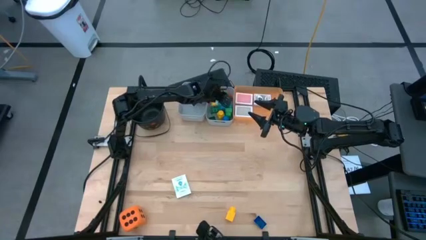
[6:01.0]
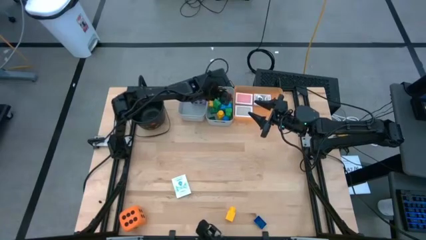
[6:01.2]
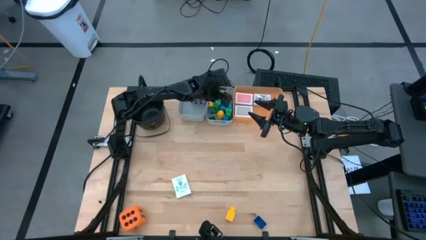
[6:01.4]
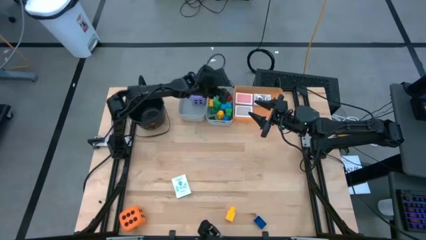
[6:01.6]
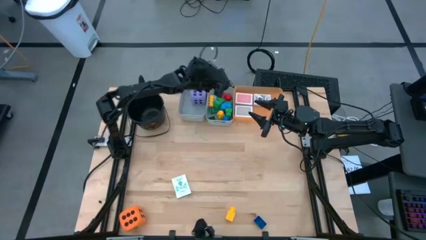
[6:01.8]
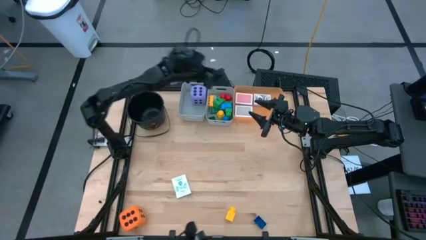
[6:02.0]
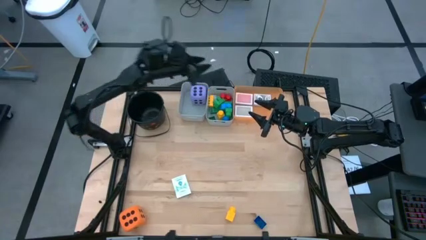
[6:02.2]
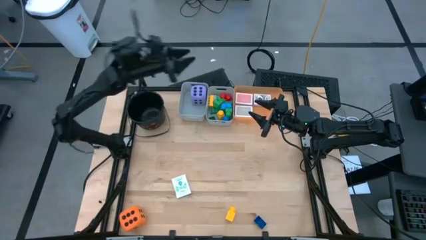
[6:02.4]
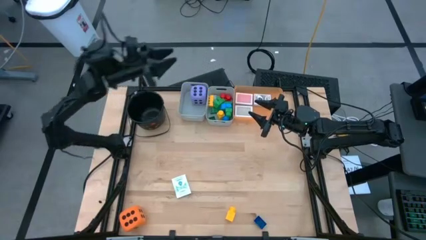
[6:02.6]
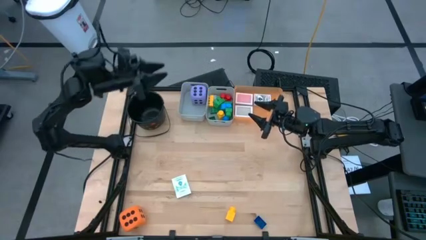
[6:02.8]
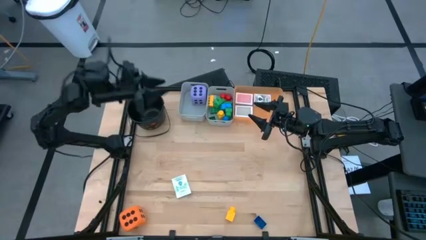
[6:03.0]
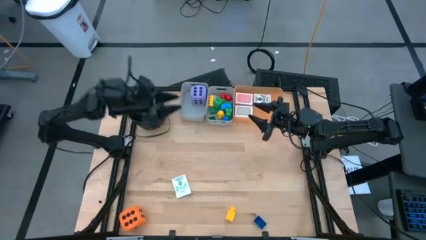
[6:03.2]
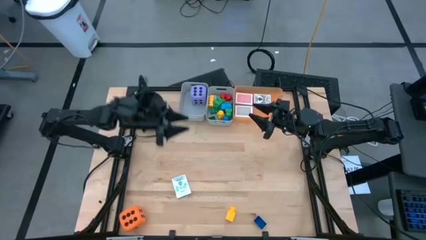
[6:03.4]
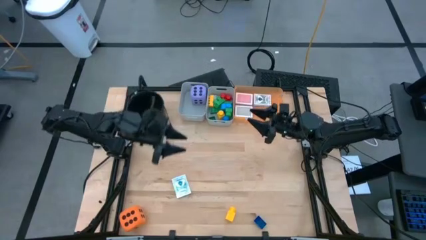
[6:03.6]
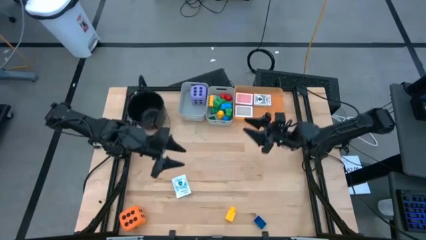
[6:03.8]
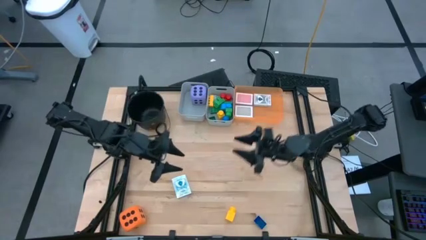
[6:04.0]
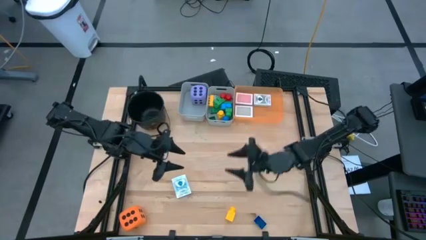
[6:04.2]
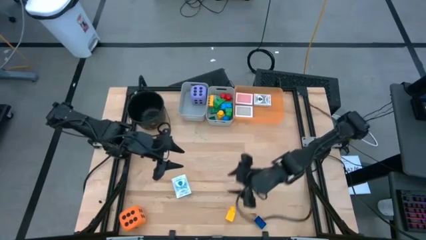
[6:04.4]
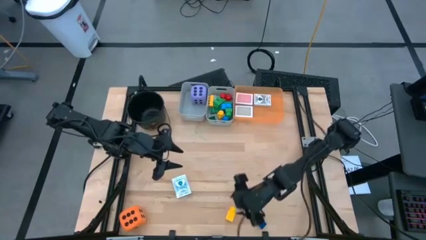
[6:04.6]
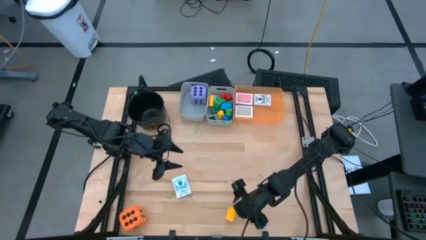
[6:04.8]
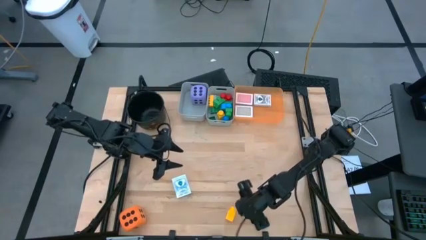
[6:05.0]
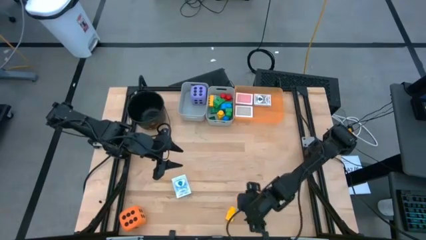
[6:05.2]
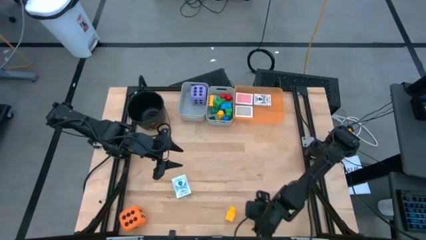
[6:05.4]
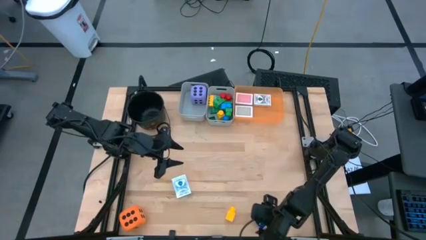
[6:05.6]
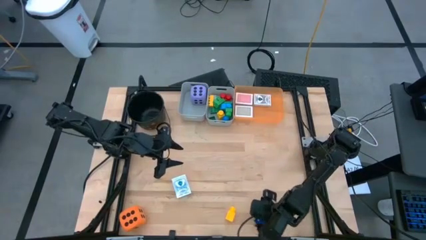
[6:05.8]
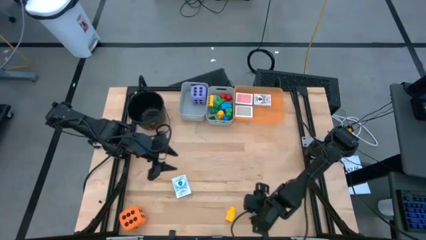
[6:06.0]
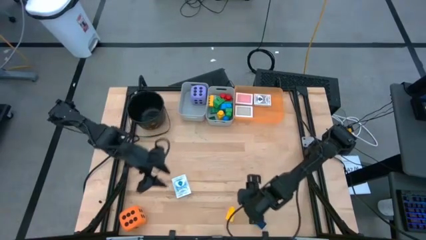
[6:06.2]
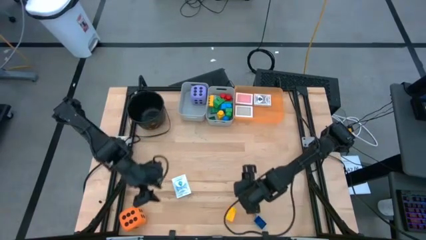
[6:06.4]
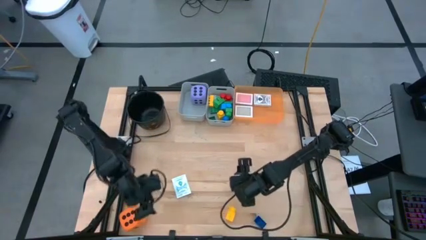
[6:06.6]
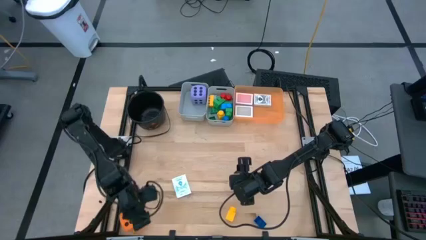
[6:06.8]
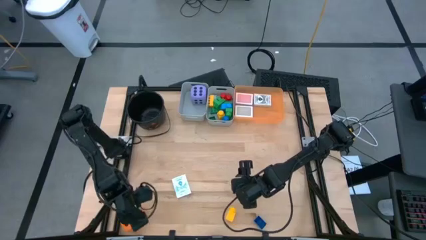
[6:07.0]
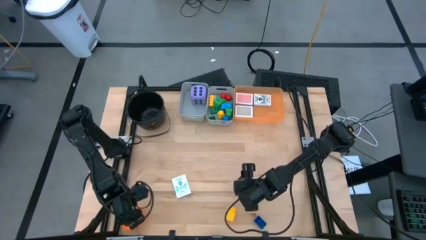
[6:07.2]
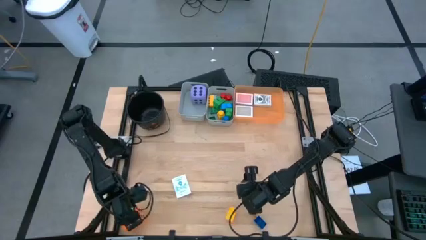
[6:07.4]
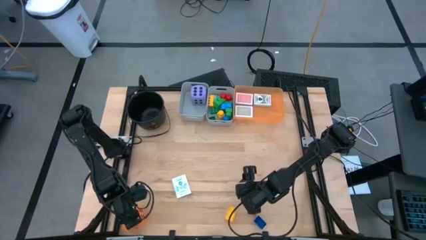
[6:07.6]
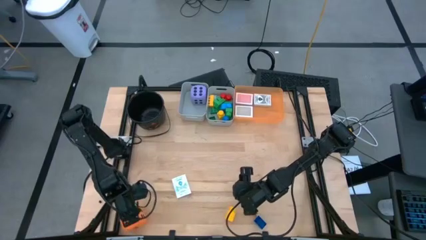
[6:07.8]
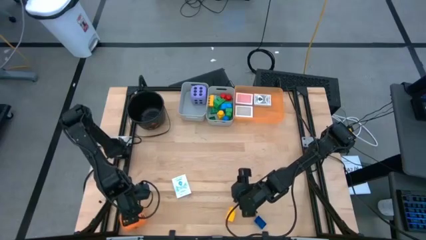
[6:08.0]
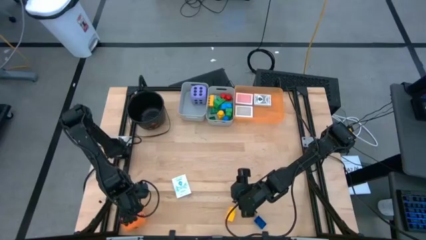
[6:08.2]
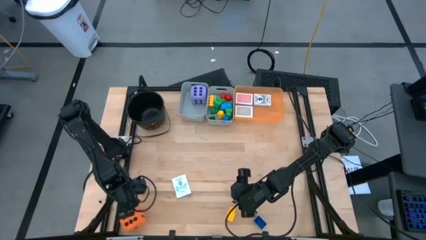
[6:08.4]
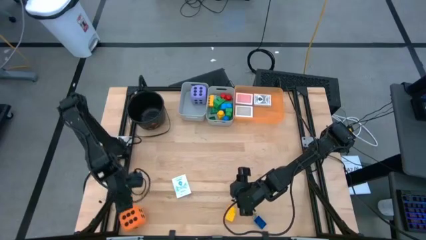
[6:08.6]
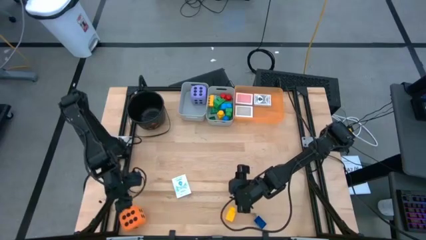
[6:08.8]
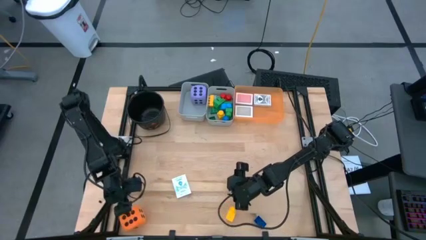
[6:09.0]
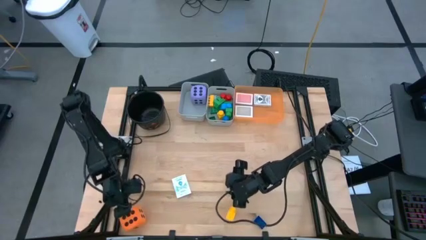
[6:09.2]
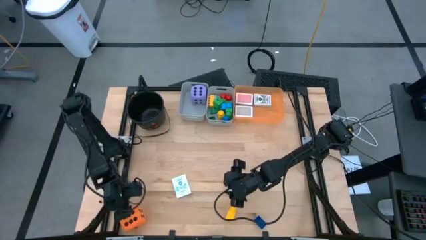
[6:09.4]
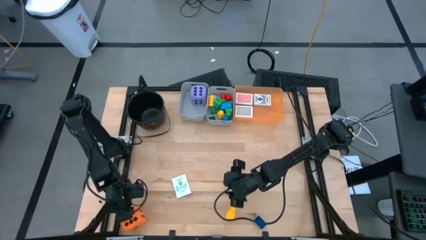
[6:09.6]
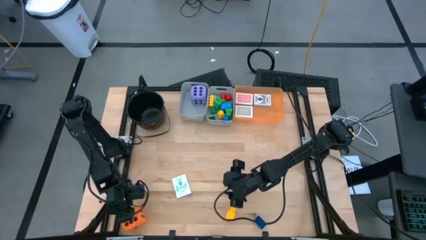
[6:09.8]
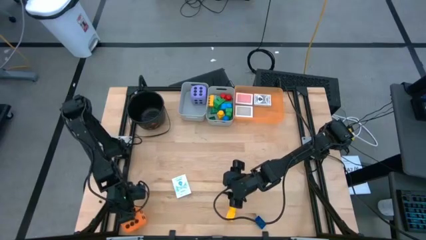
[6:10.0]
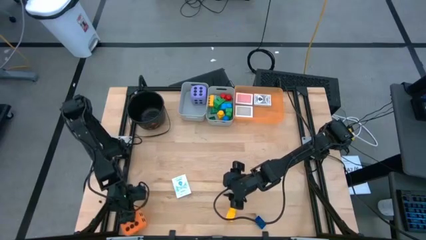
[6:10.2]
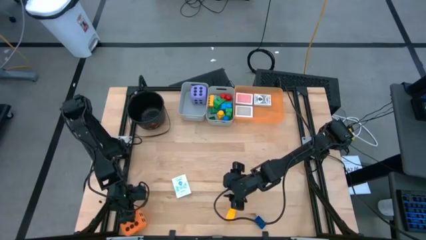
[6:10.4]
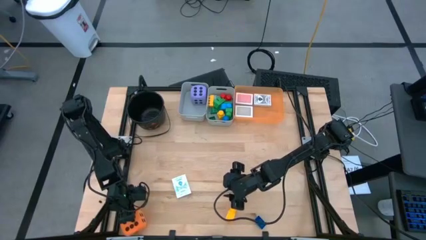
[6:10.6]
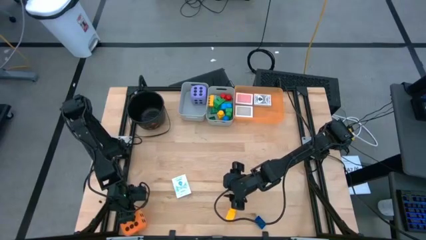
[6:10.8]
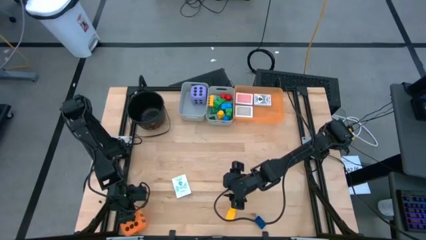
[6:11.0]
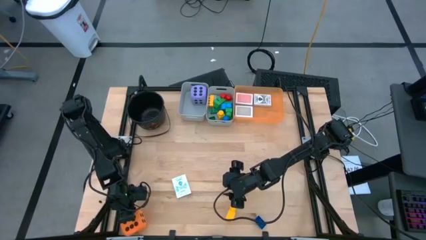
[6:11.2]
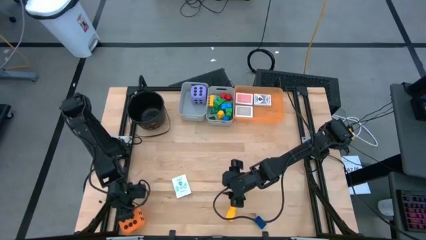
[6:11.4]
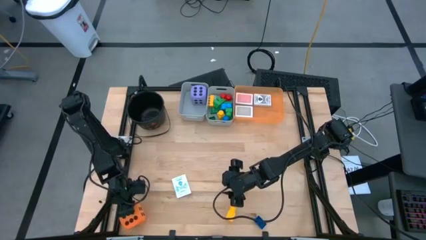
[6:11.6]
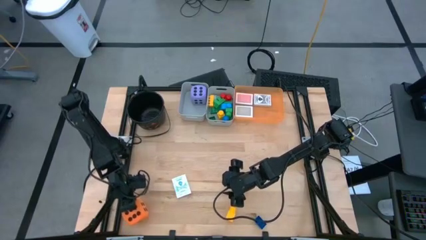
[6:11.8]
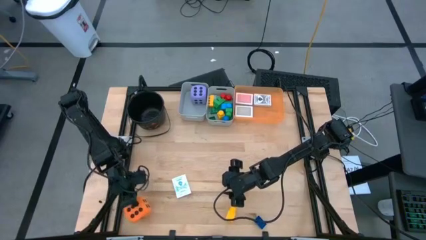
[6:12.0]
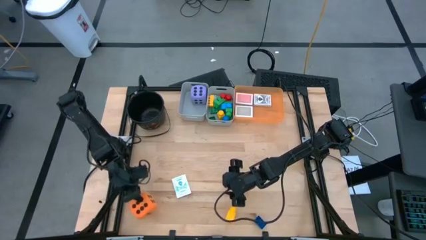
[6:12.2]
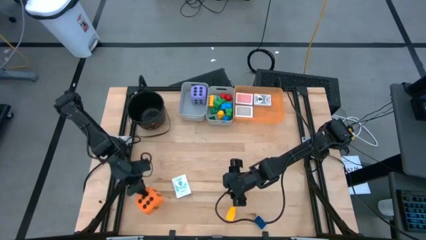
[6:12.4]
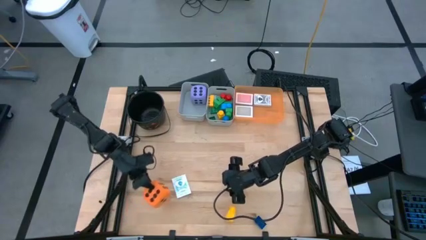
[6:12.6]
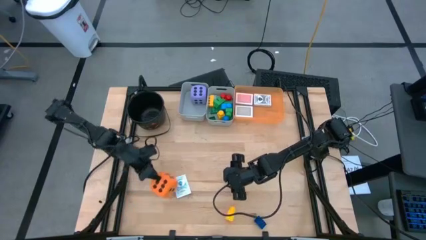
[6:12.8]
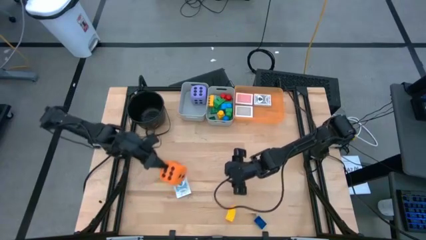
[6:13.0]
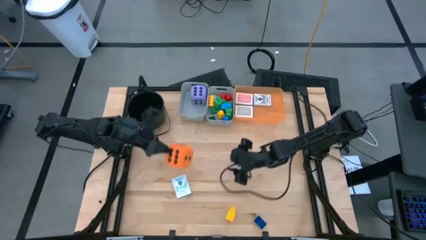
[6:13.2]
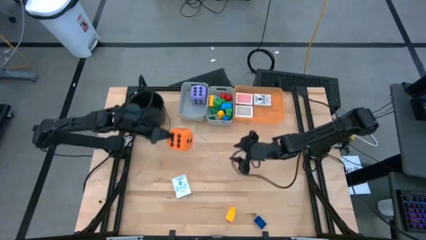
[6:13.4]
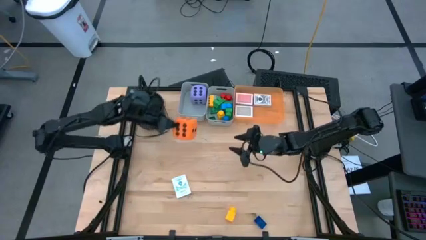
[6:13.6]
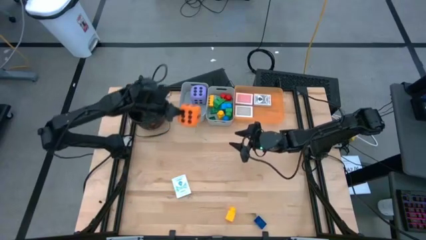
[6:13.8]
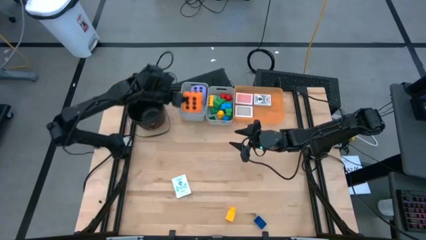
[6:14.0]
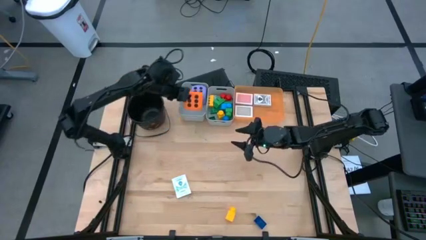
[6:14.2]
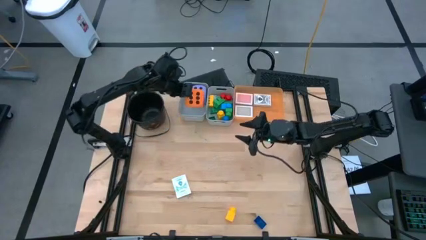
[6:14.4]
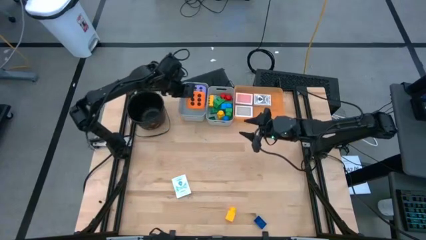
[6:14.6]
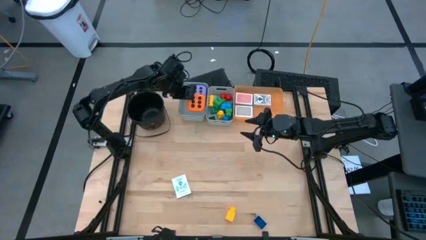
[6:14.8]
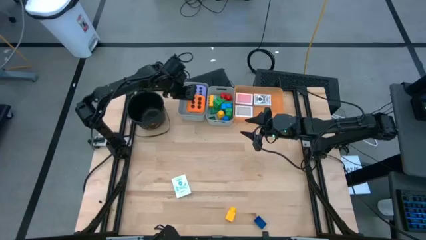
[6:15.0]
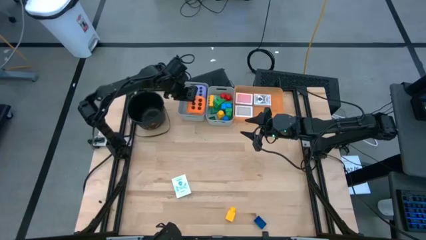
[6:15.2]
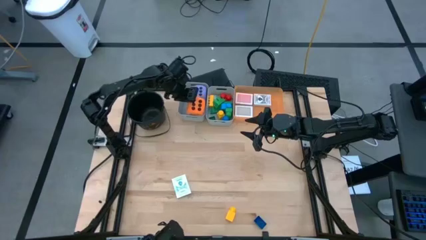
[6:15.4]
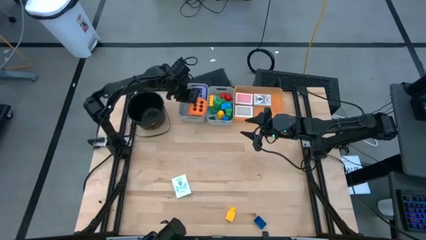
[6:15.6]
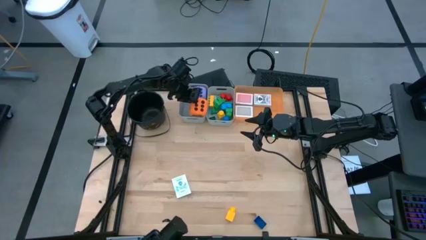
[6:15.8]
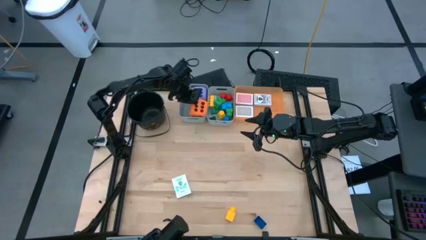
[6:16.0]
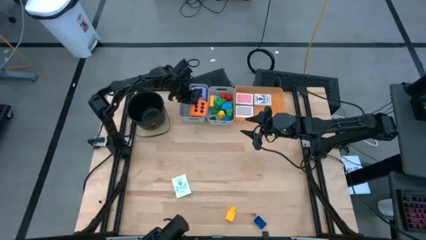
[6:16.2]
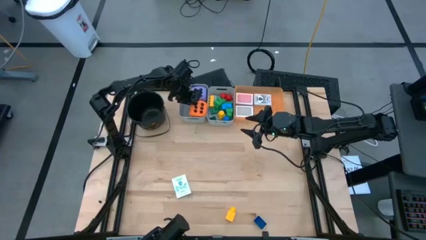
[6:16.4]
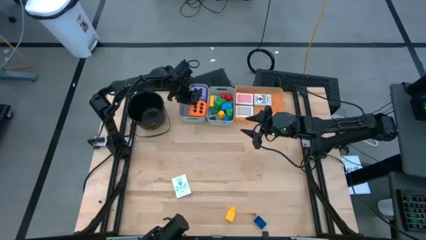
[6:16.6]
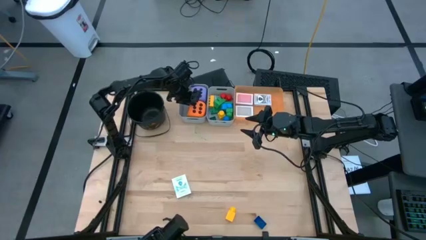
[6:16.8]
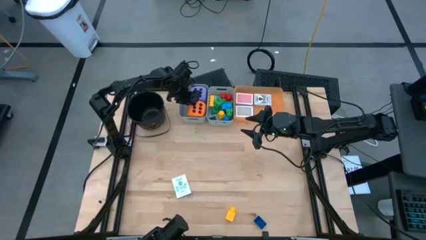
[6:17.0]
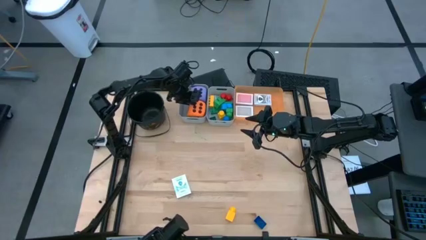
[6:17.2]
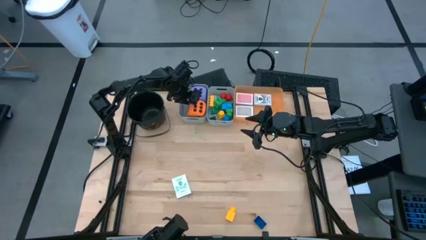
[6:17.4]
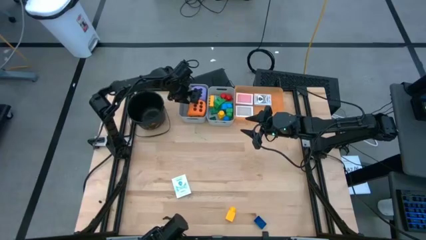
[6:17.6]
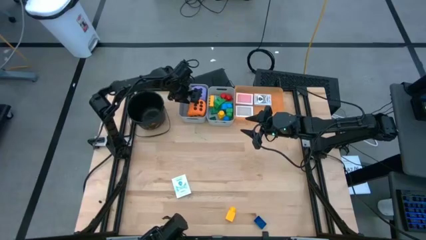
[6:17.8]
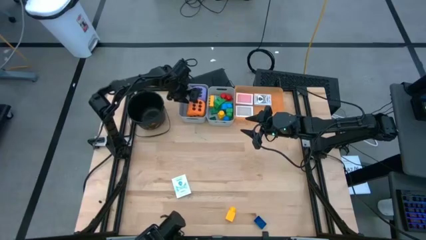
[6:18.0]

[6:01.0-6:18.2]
Task: Pick & Place Toys
Put the orange dice into the left gray bin
